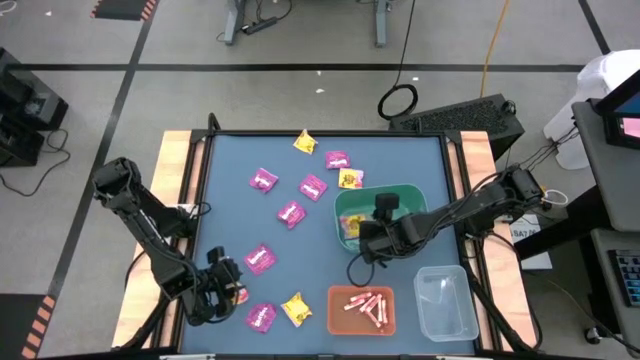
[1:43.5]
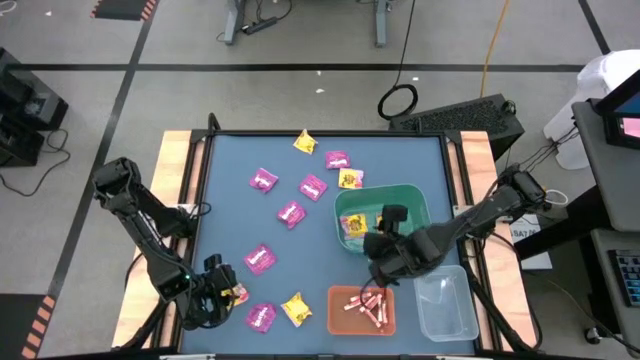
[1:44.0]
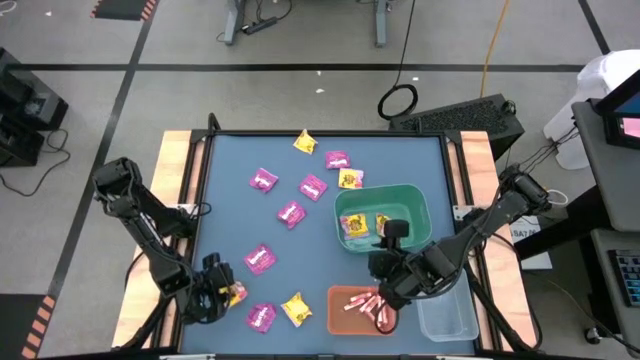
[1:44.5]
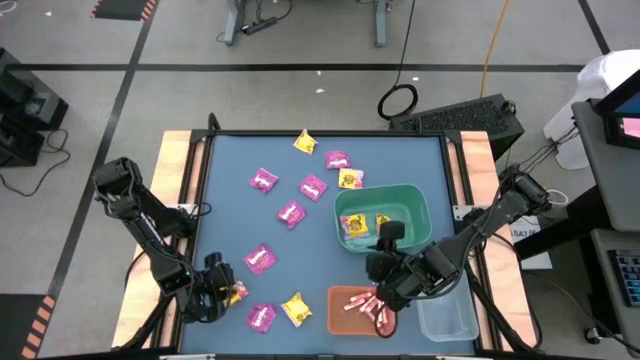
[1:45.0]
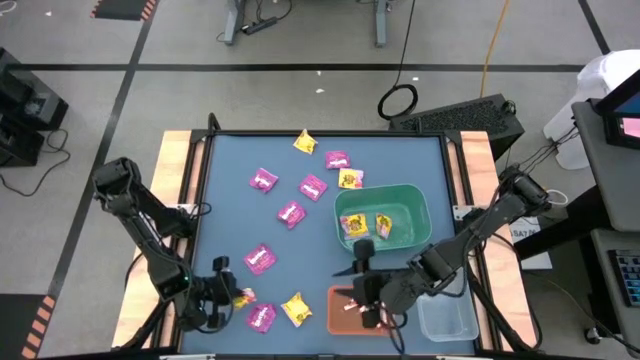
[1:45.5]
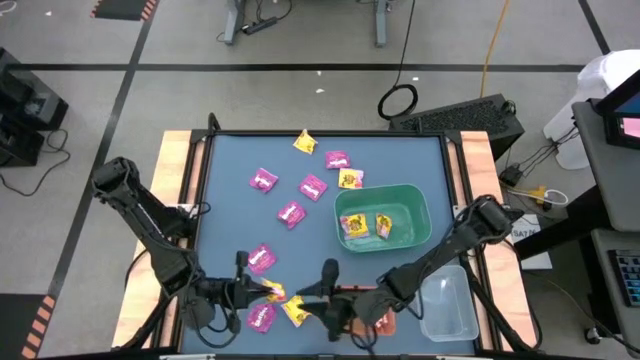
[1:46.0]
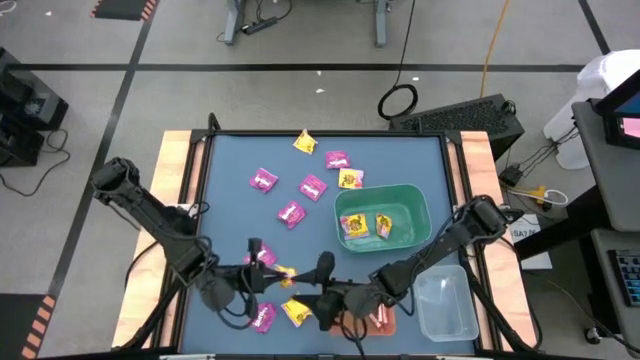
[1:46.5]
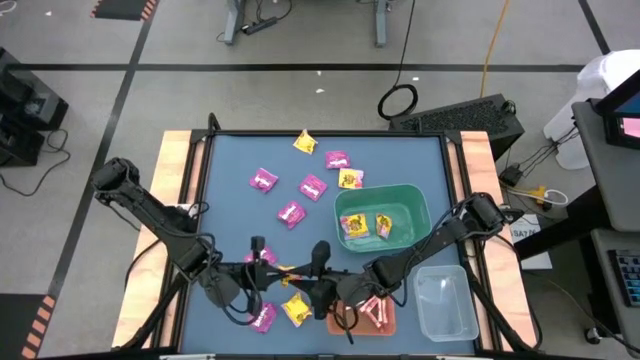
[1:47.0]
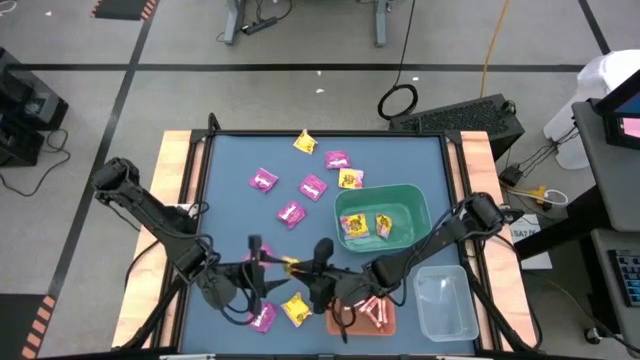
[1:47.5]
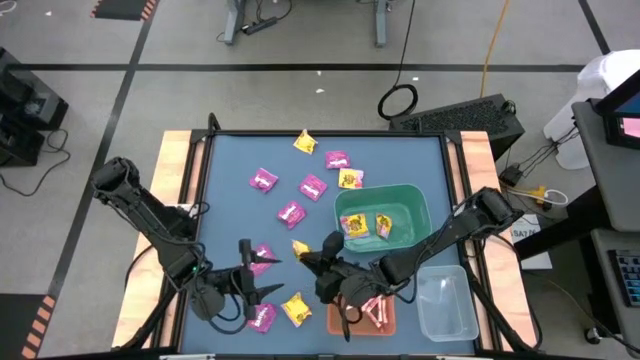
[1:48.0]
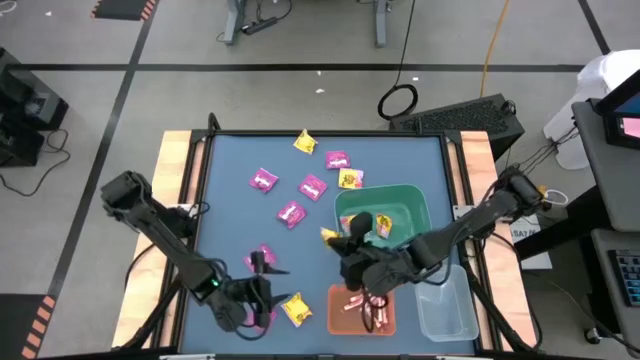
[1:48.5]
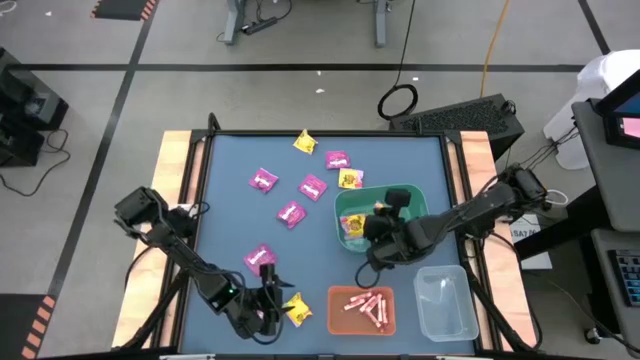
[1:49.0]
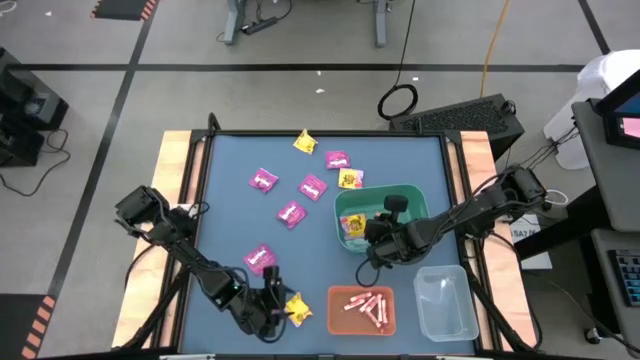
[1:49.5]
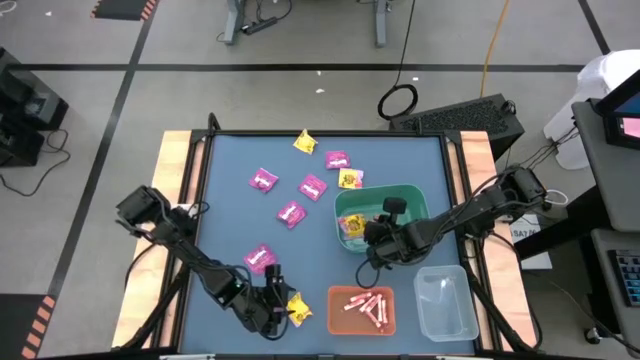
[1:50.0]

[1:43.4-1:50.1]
Task: Sort candy
Put the yellow candy pack into the green bin

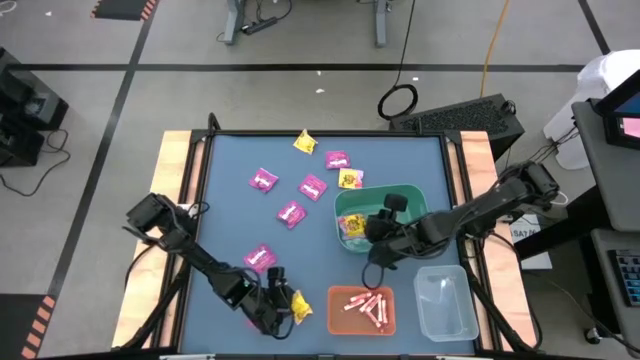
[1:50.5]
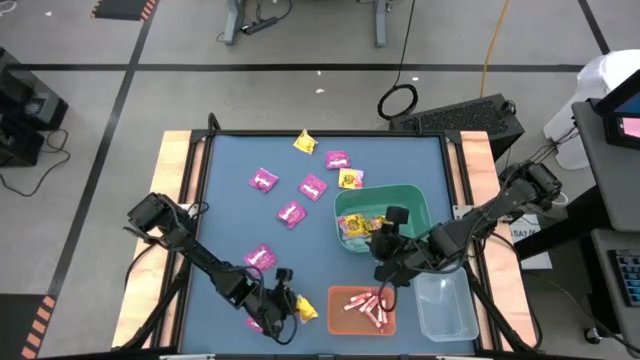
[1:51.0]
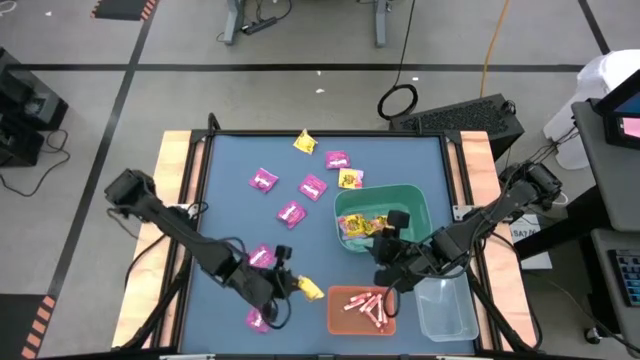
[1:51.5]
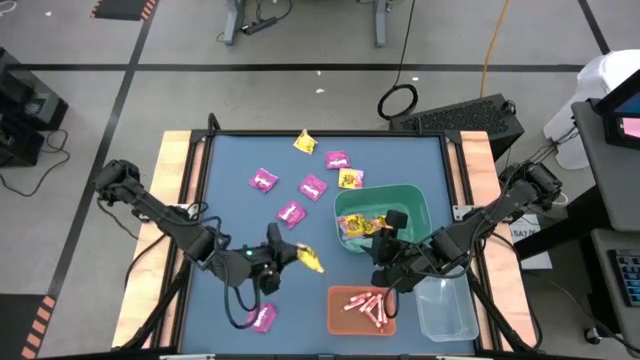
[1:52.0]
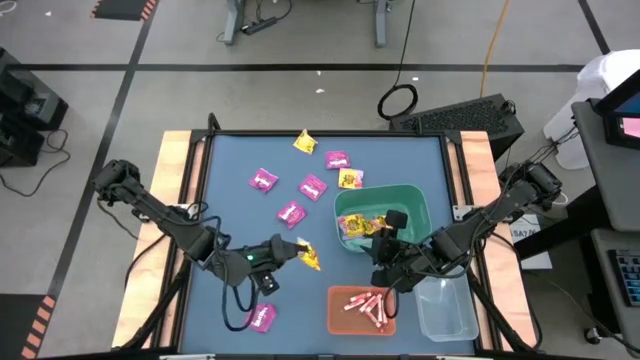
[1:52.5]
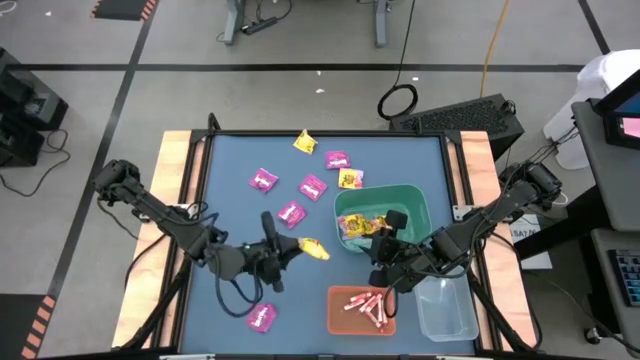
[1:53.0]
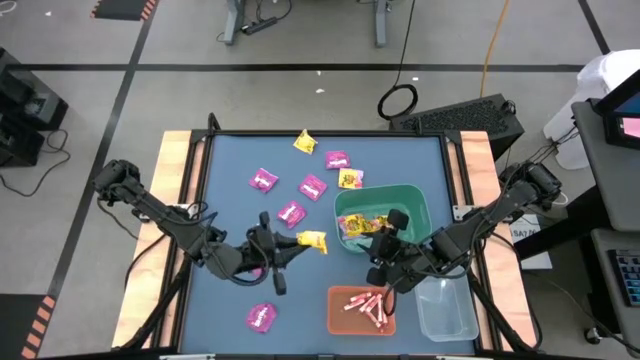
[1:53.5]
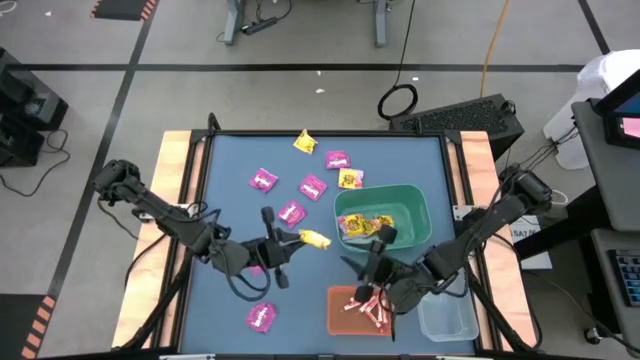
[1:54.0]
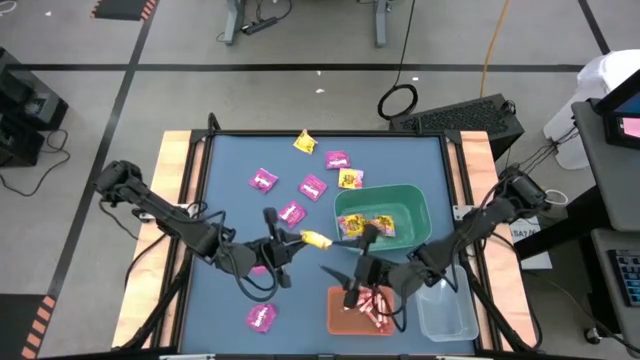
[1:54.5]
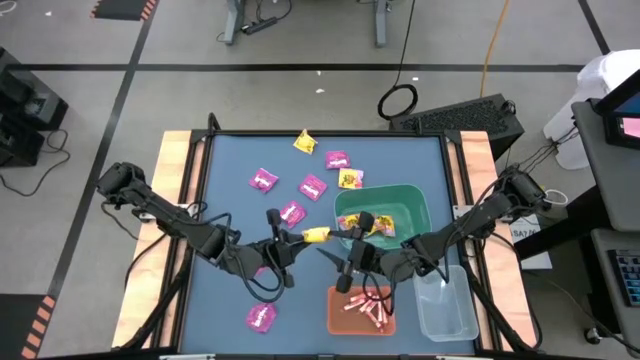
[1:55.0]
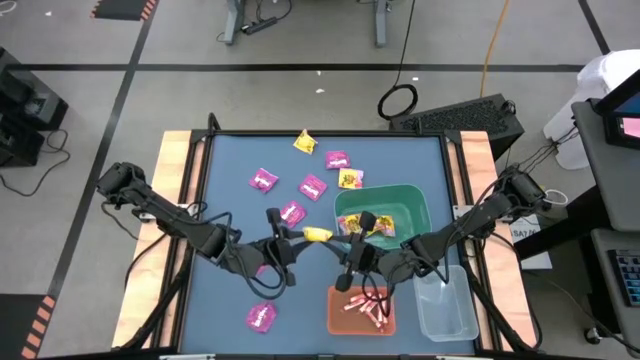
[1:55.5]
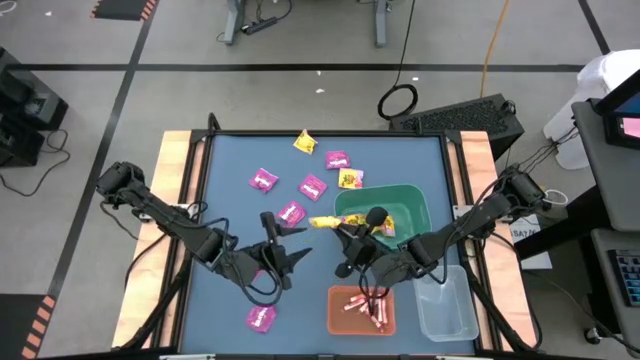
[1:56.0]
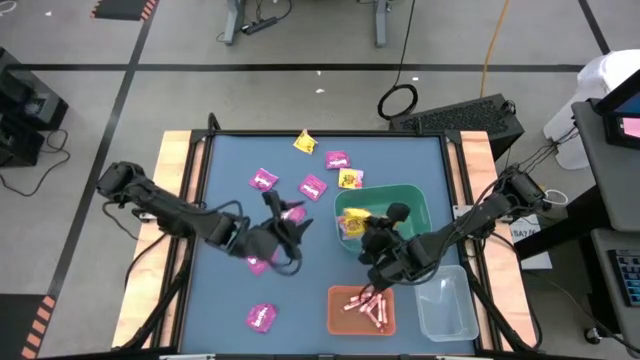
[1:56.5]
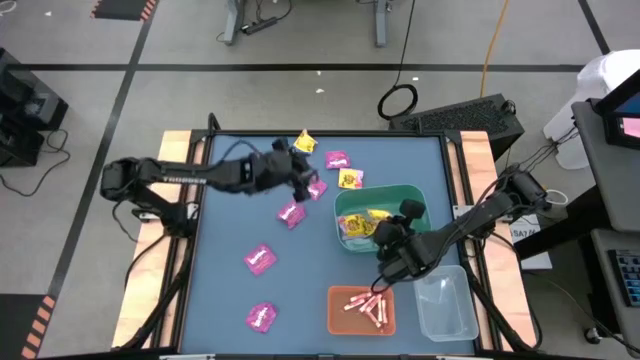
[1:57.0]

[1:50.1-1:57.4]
Put the yellow candy pack into the green bin

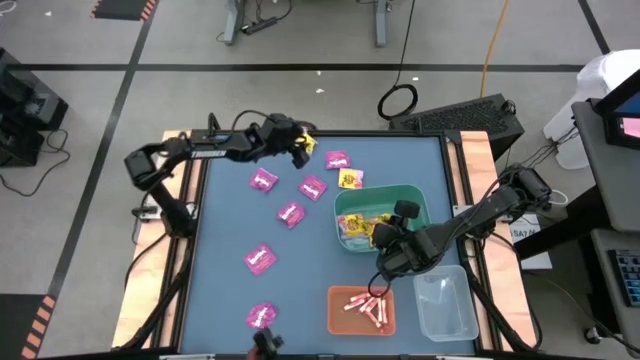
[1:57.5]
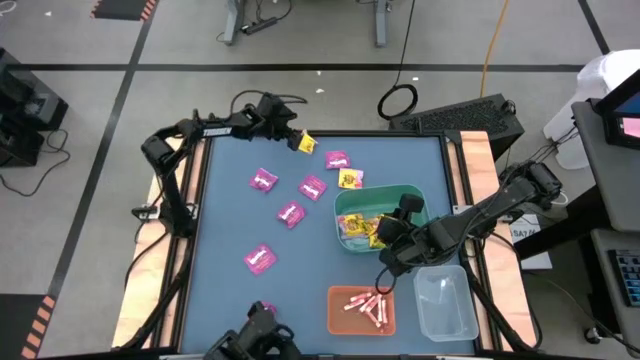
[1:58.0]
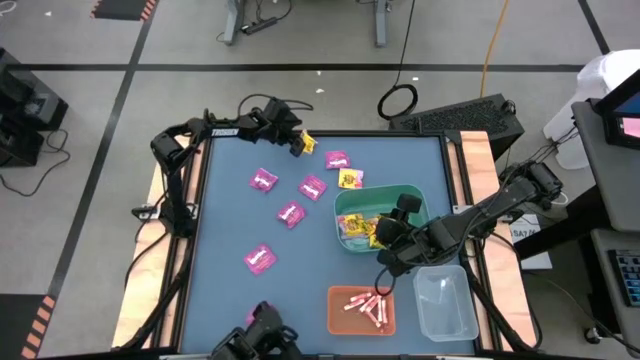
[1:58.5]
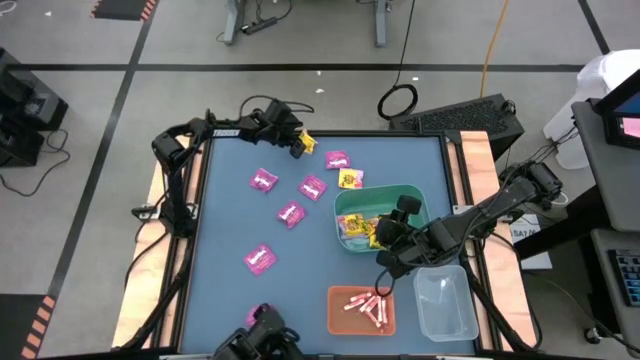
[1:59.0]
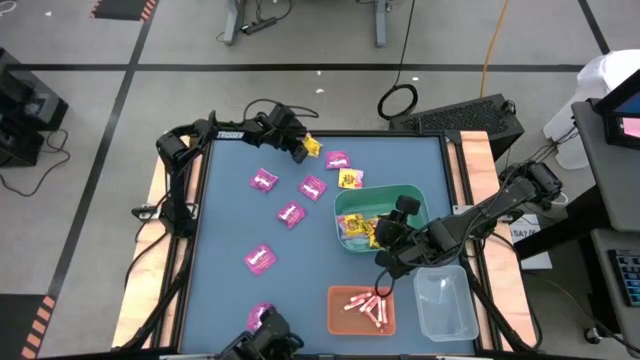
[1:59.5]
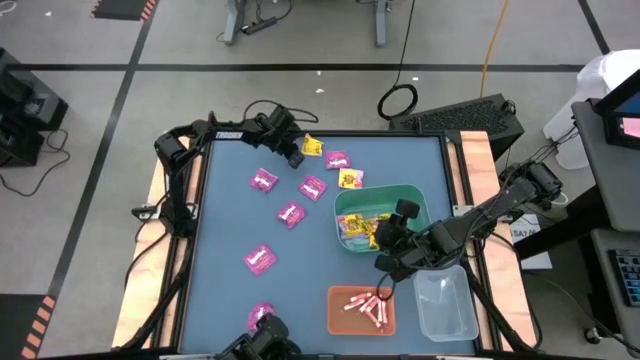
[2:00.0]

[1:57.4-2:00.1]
Put the yellow candy pack into the green bin

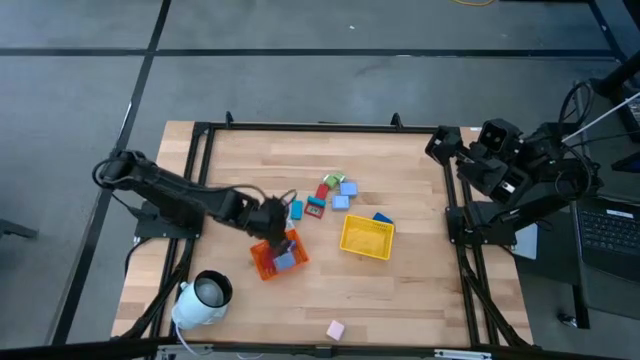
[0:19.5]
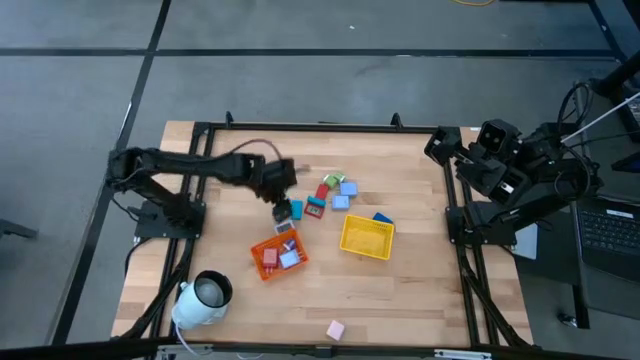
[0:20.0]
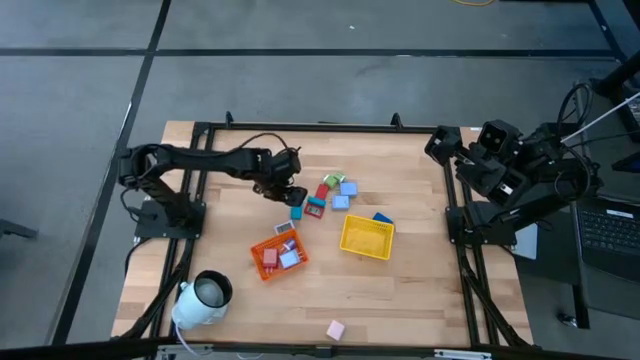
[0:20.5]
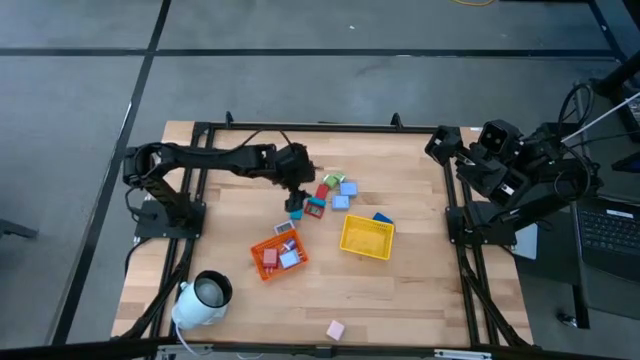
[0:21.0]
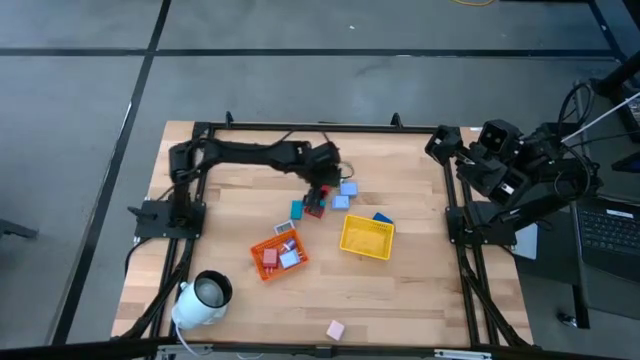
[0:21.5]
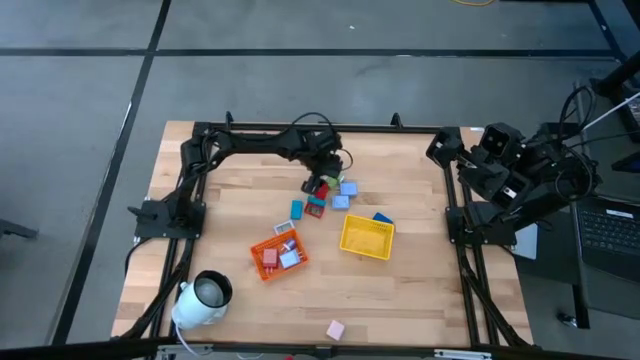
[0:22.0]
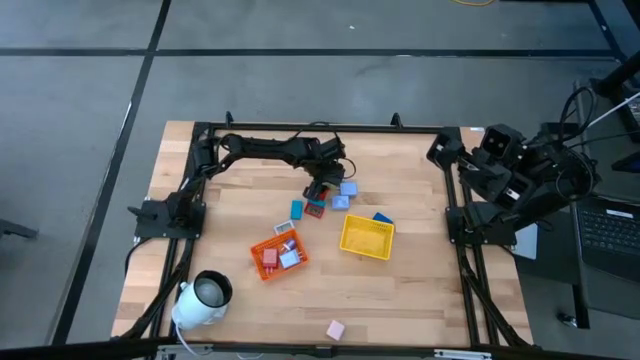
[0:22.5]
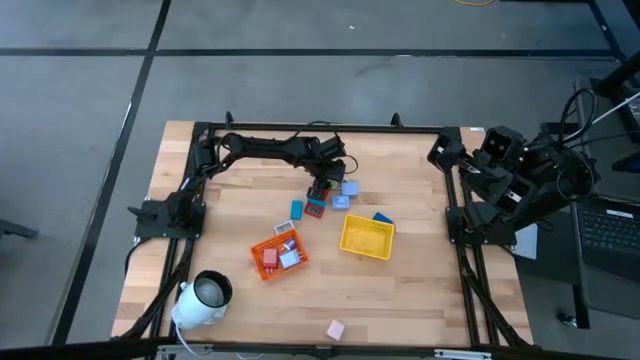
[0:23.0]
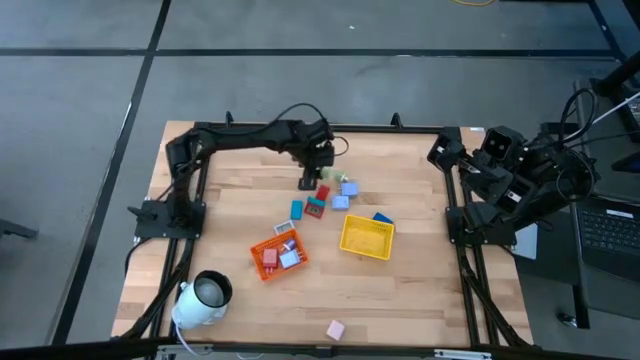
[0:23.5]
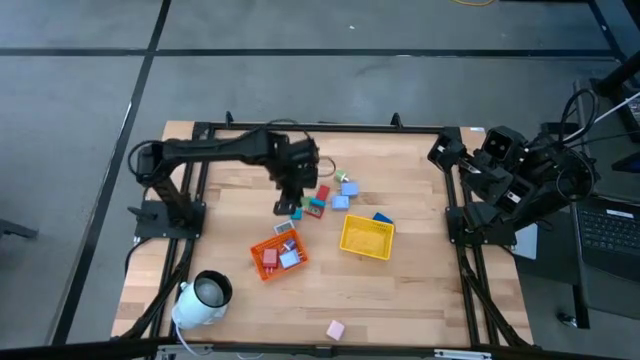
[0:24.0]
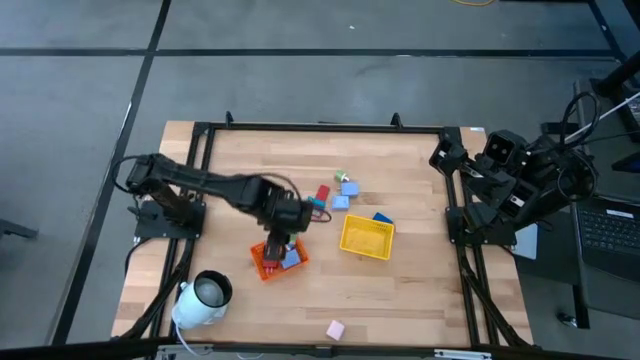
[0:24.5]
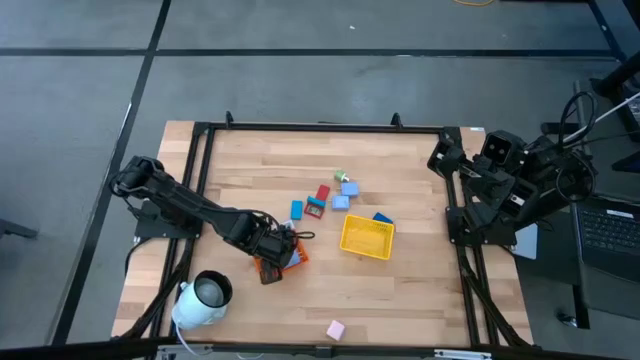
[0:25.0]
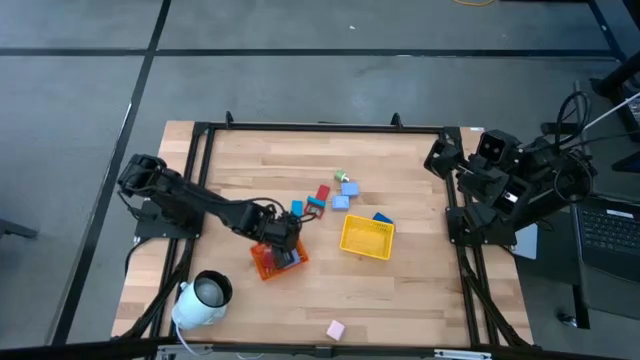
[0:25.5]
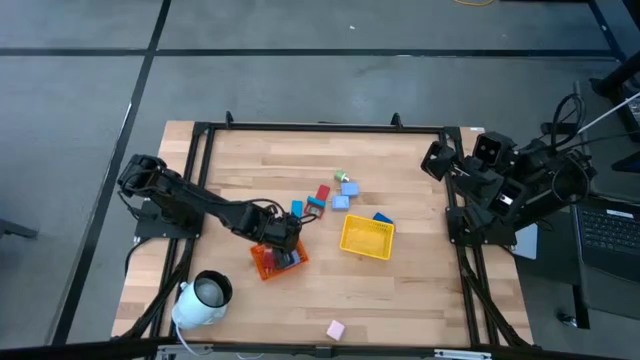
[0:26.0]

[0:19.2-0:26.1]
Task: Pick & Place Office items
Put the left green charger adapter into the orange bin
